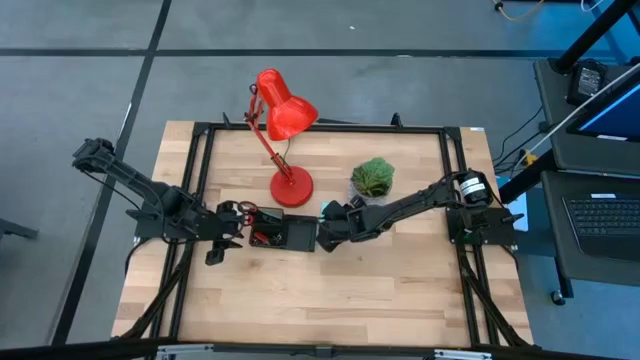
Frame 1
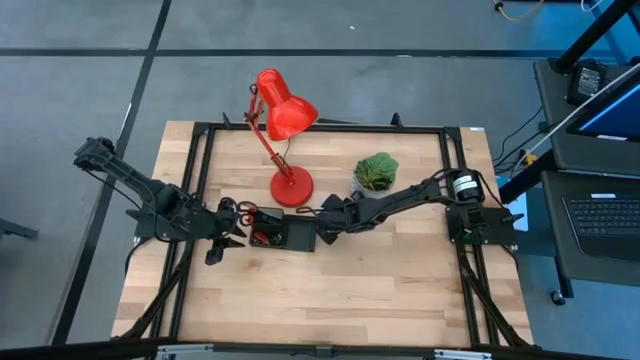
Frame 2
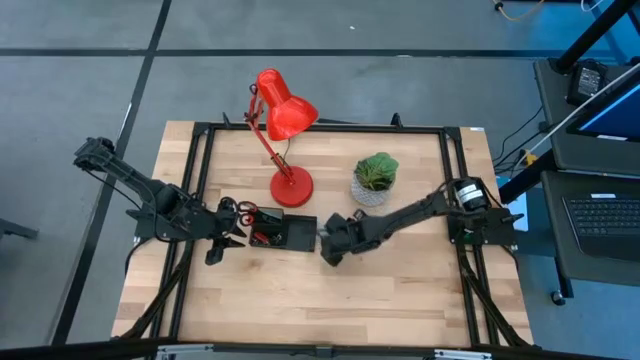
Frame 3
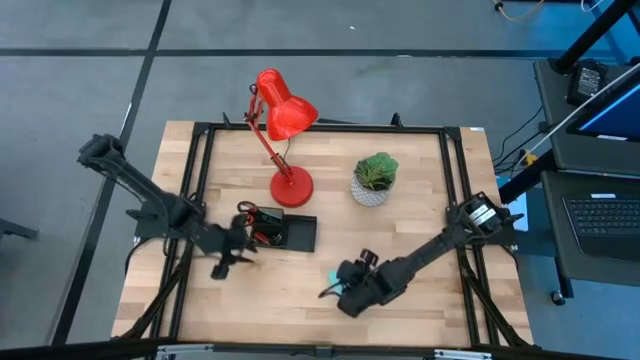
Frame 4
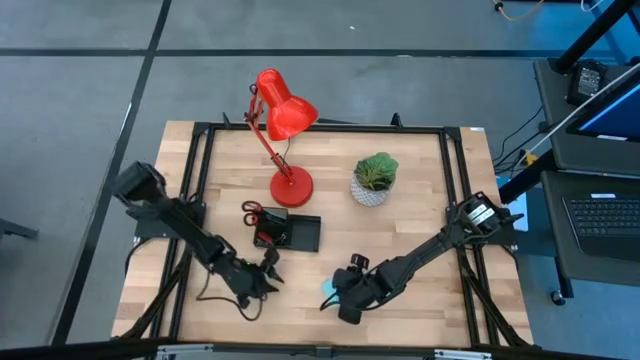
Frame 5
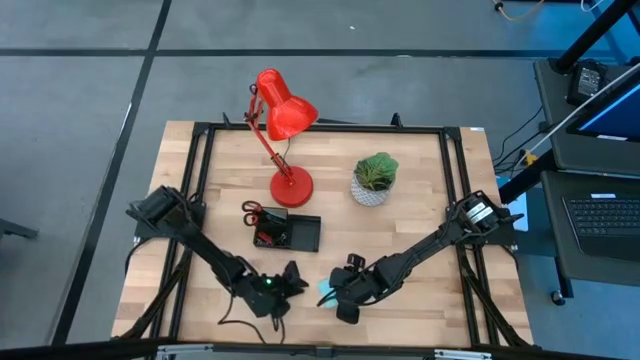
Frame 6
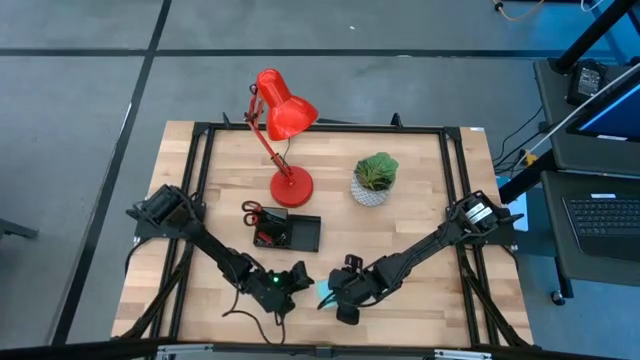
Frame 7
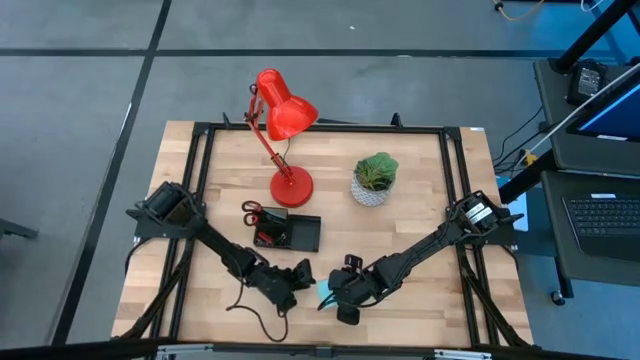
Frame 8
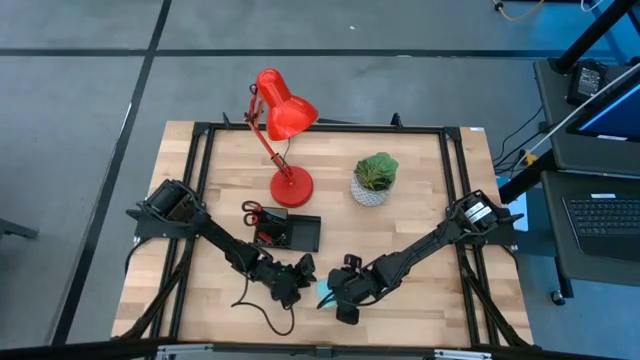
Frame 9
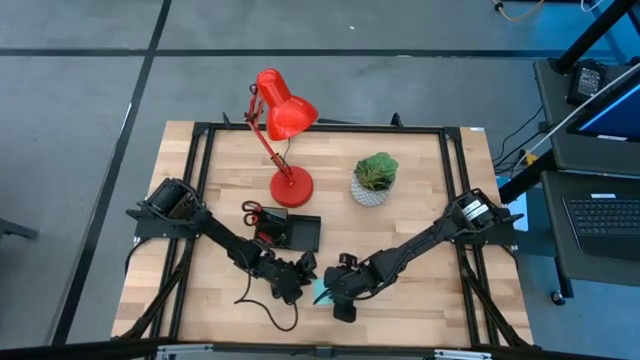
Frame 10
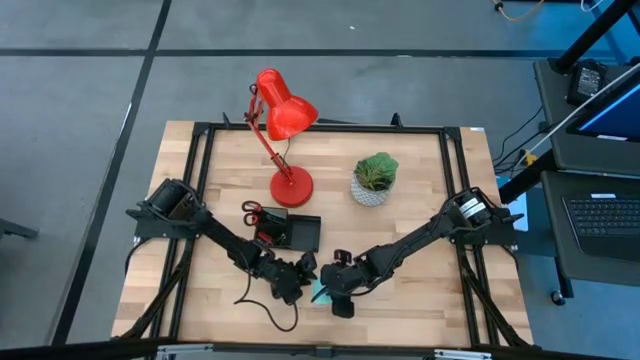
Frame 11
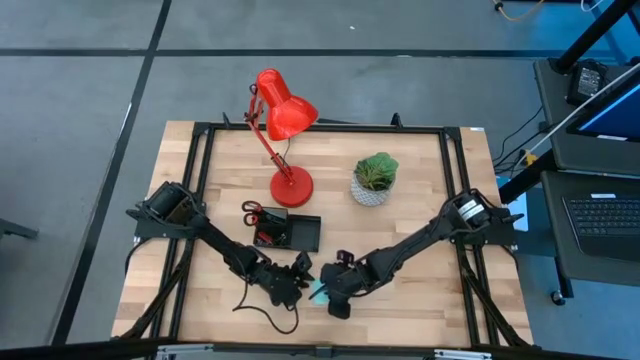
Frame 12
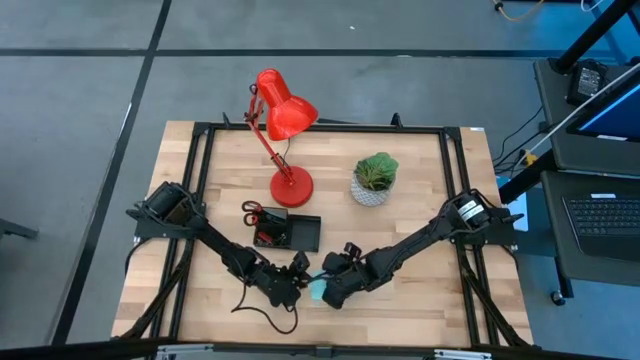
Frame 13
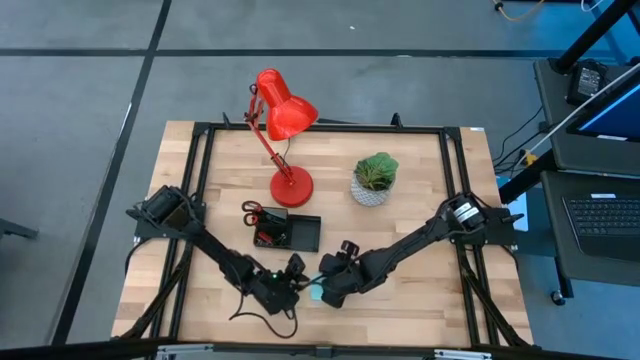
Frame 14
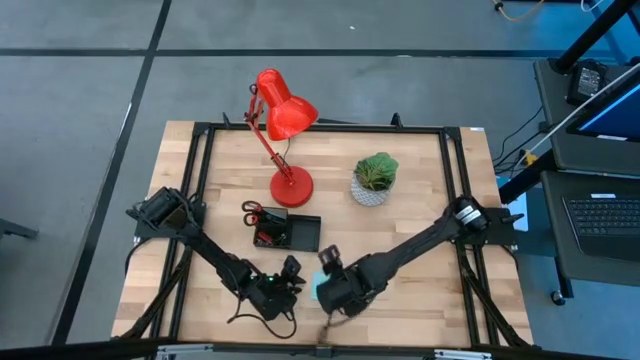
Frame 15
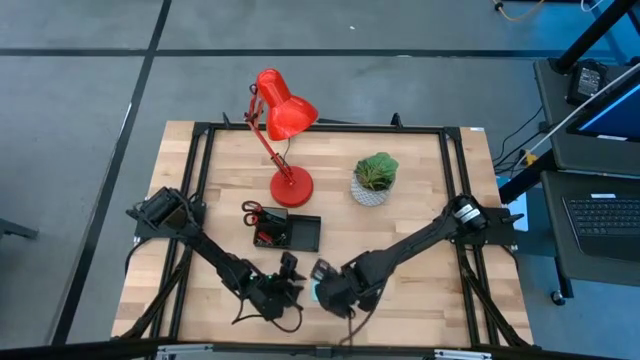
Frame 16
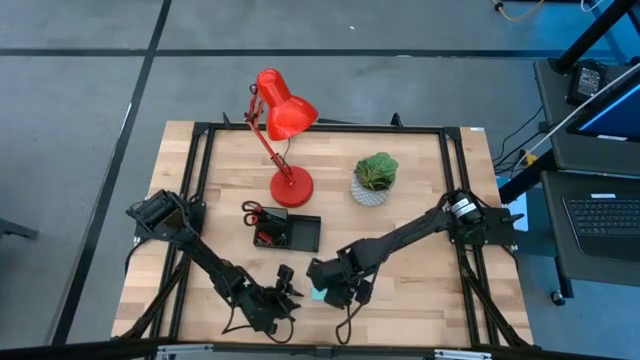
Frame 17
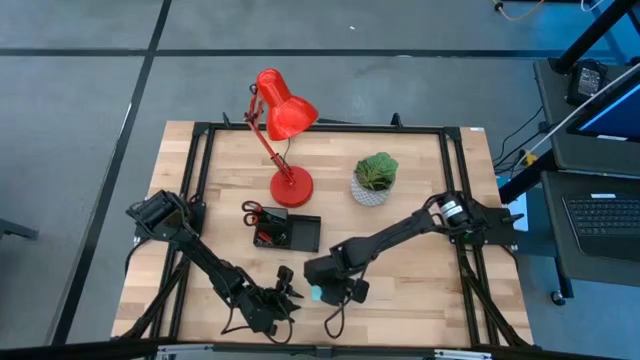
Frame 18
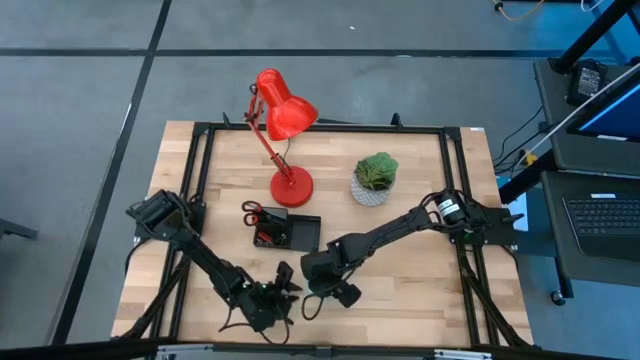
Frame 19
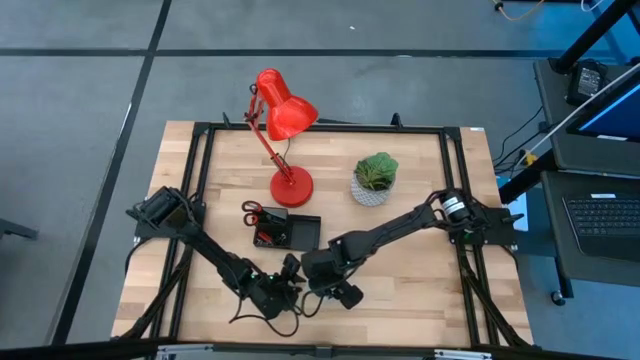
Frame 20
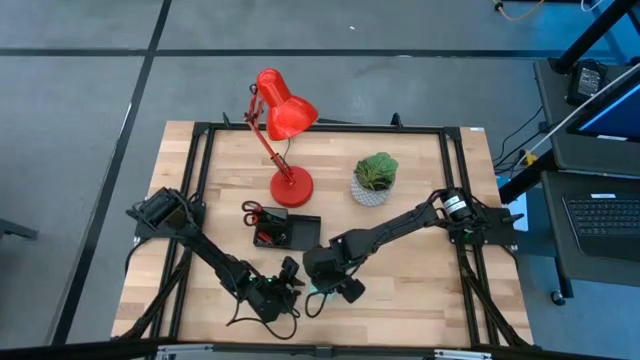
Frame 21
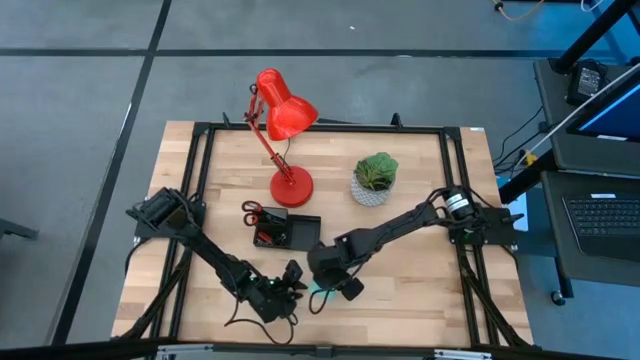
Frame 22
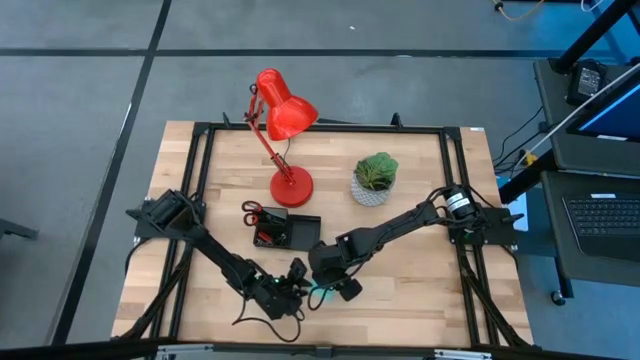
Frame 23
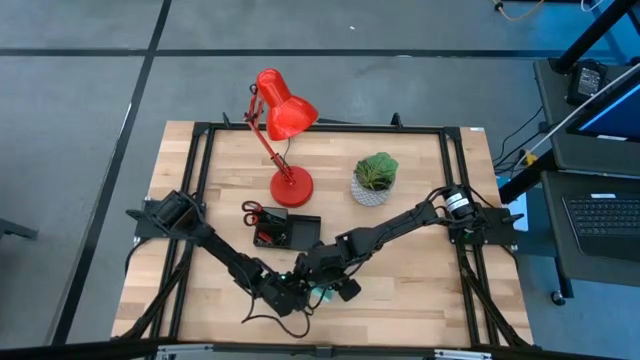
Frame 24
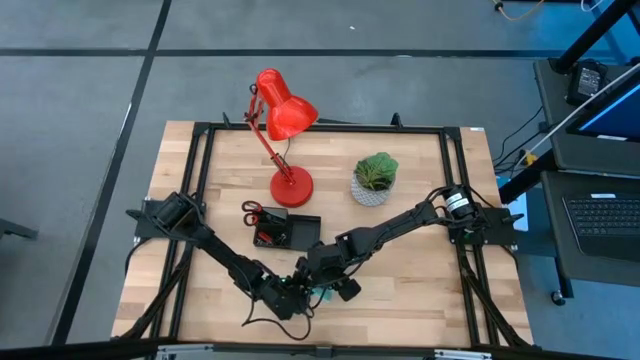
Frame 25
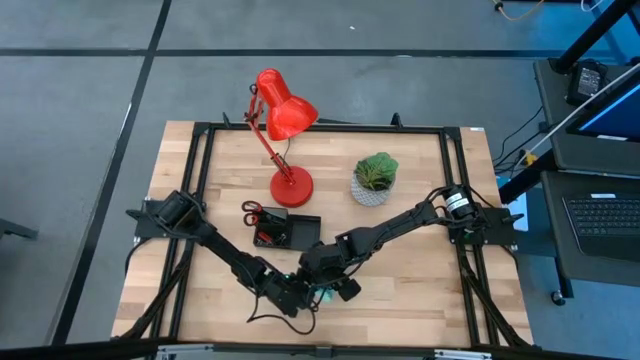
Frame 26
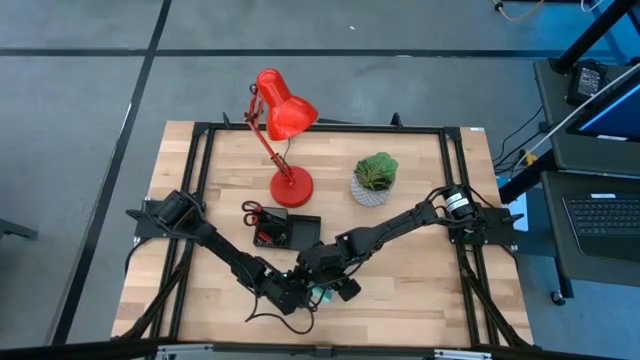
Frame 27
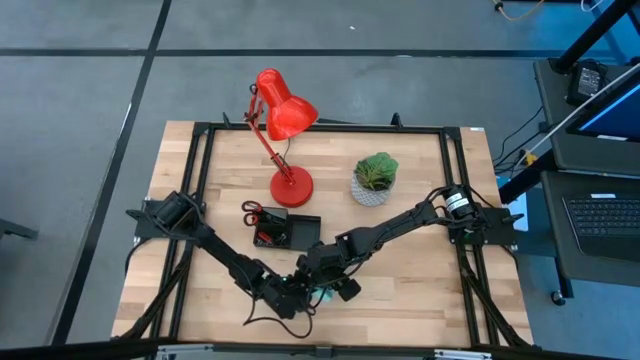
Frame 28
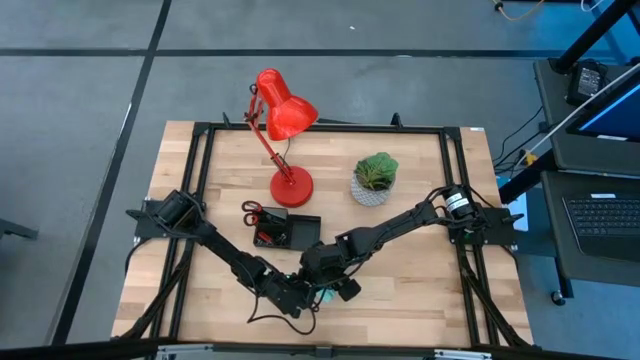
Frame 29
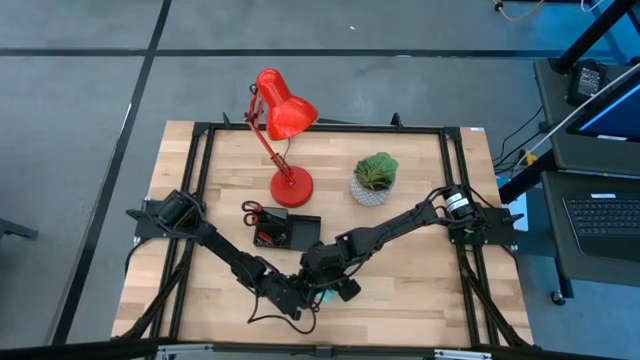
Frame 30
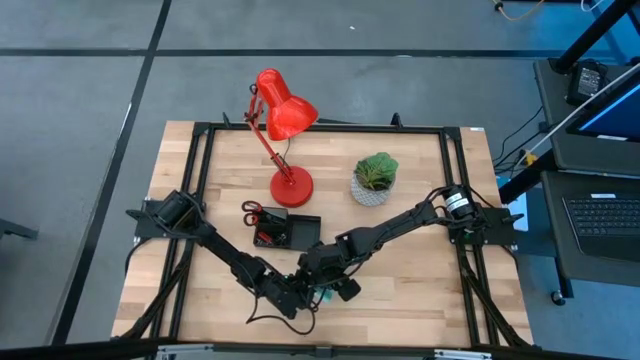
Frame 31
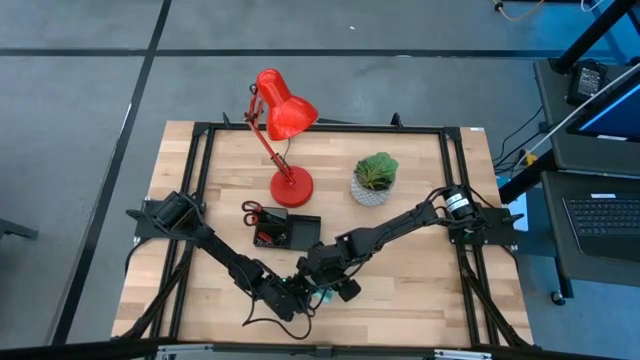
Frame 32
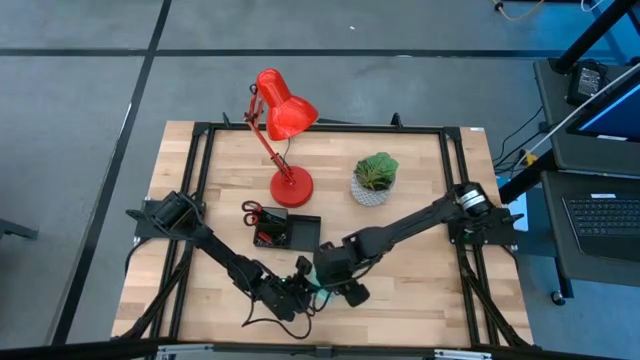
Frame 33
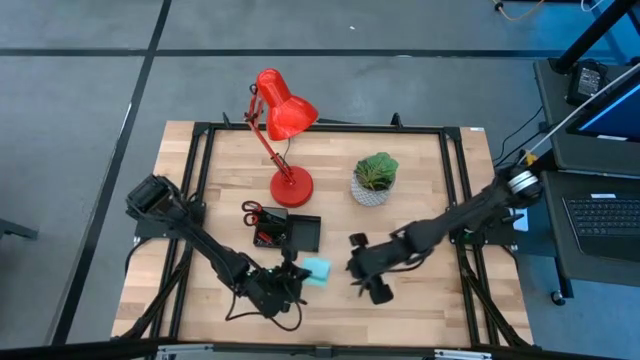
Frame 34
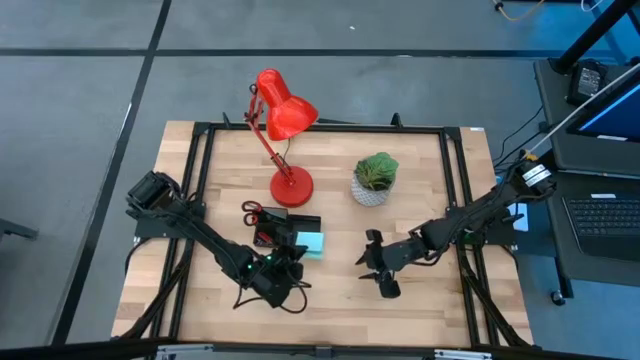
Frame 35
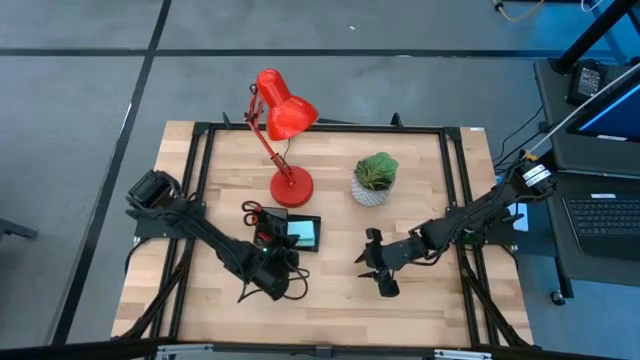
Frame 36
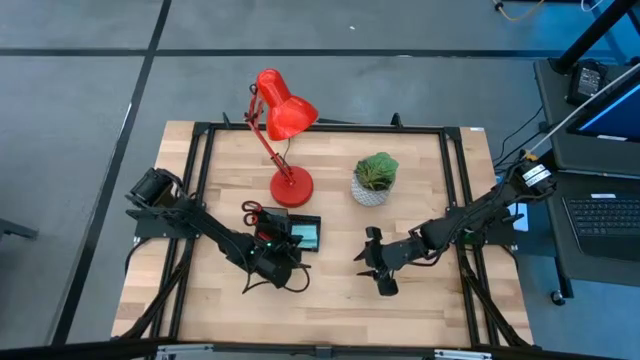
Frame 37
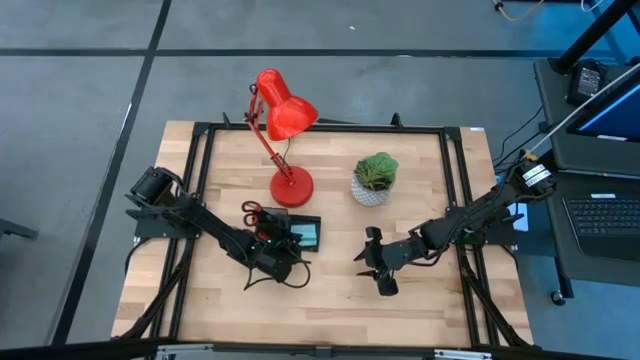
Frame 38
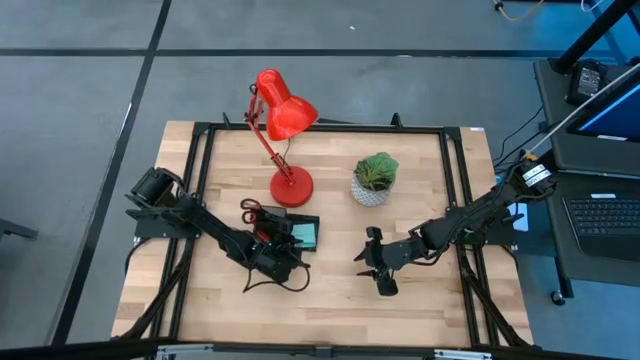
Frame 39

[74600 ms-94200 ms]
Task: Pick and place office supplies into organizer
Put the blue sticky notes into the black desk organizer

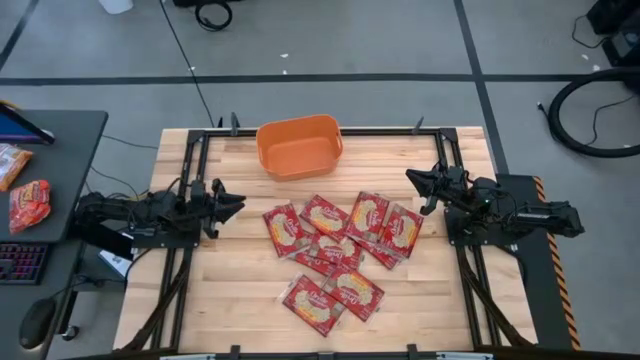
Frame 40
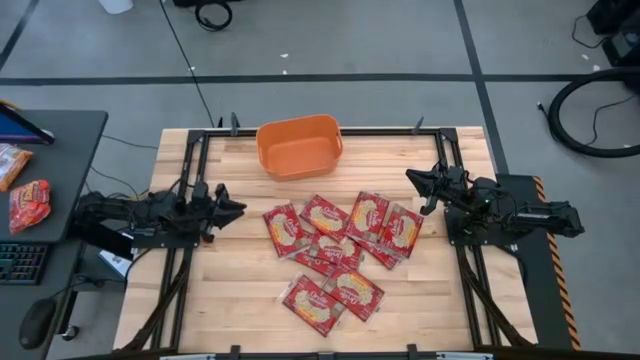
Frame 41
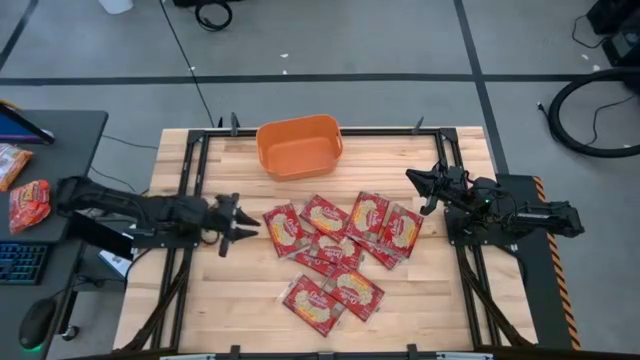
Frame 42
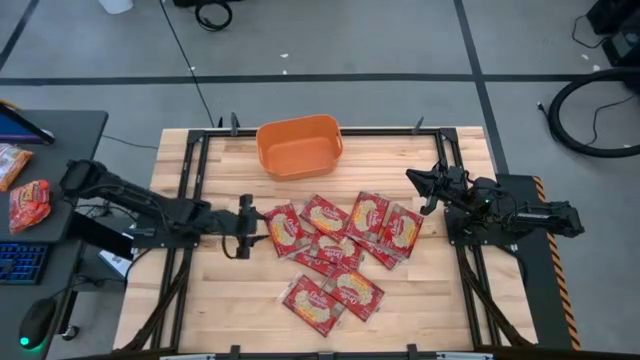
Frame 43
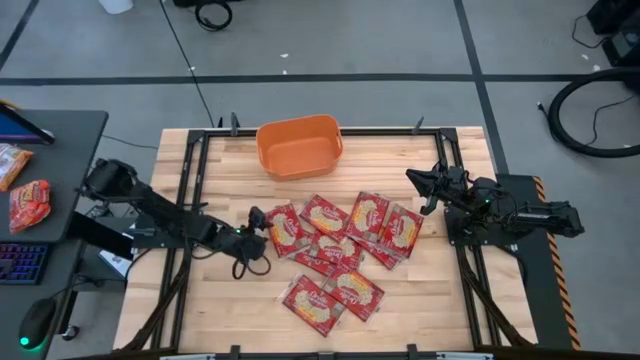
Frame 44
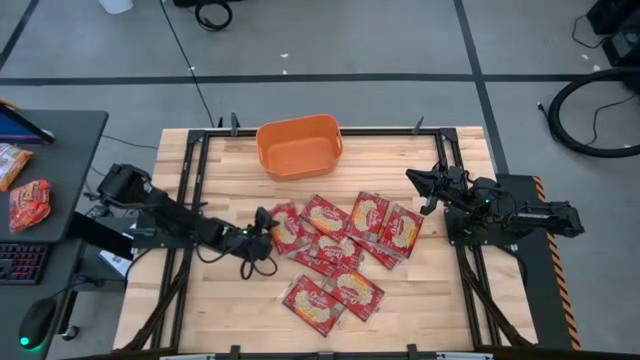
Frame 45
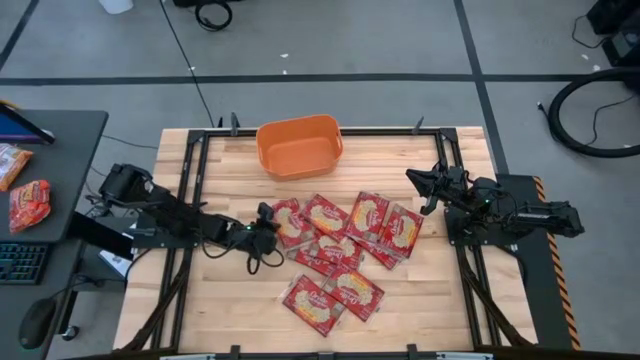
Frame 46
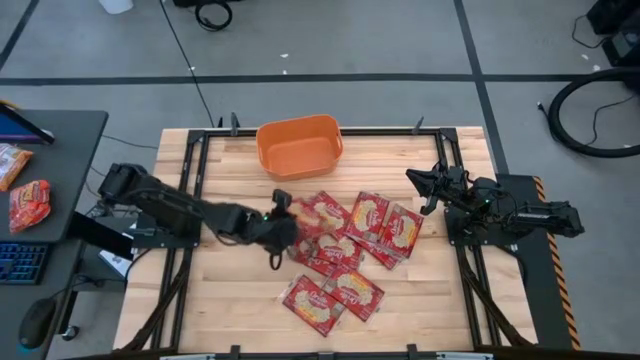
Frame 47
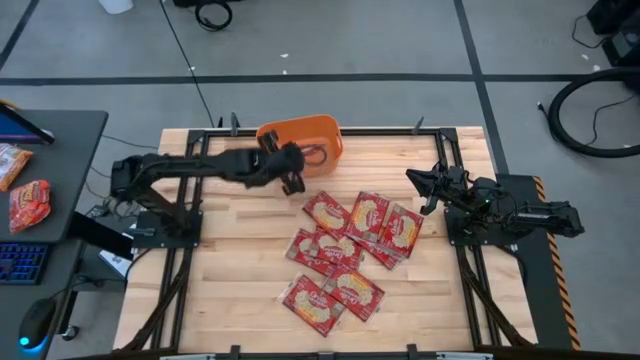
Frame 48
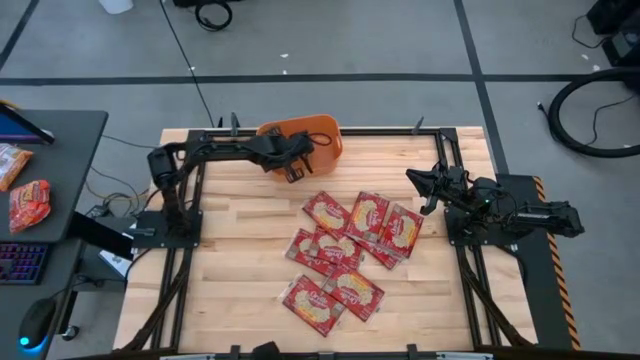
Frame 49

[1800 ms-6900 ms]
Task: Sort popcorn bags into baskets
Put the red popcorn bag into the orange bin
